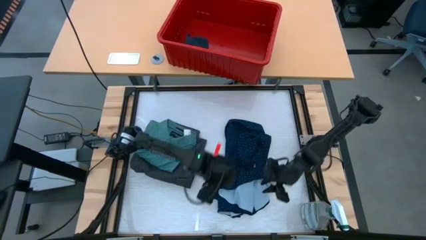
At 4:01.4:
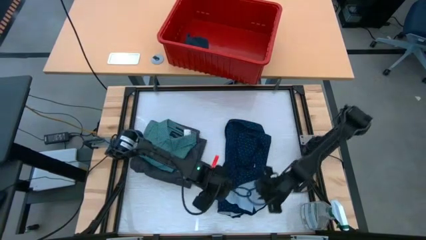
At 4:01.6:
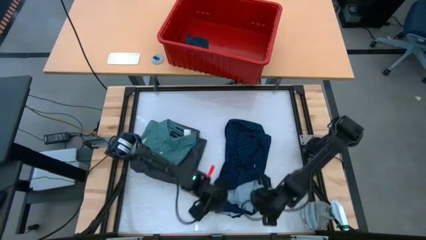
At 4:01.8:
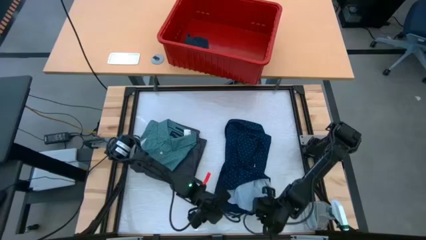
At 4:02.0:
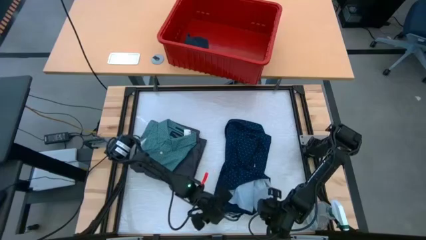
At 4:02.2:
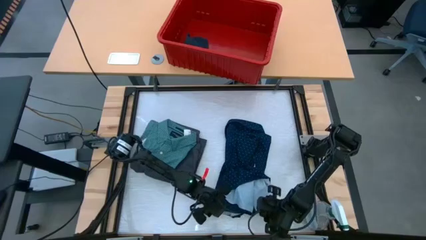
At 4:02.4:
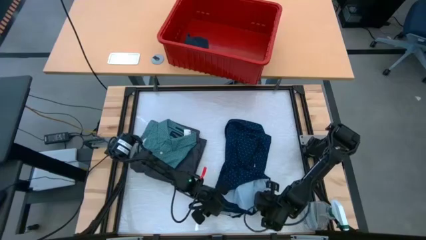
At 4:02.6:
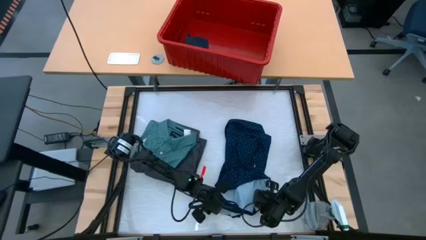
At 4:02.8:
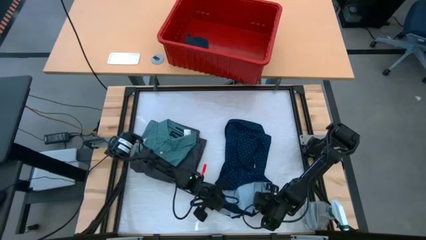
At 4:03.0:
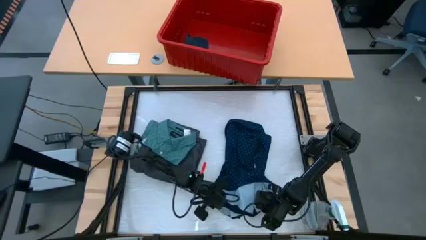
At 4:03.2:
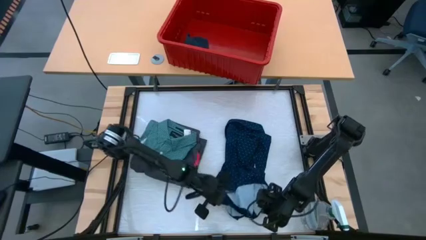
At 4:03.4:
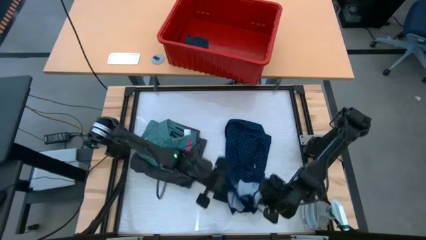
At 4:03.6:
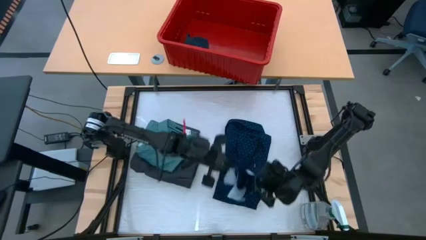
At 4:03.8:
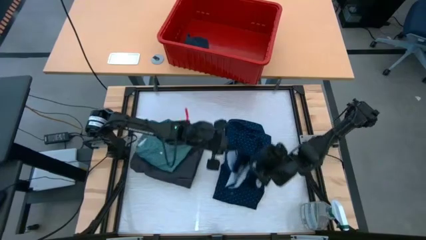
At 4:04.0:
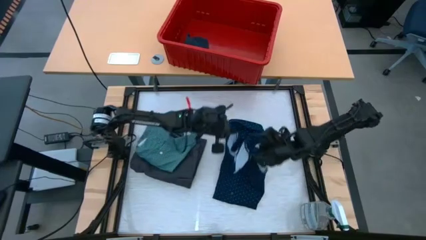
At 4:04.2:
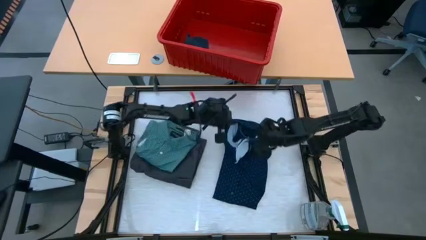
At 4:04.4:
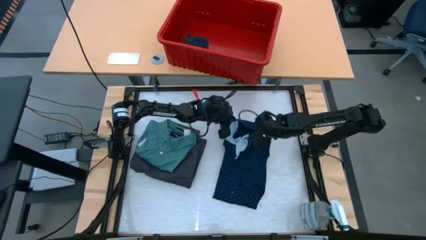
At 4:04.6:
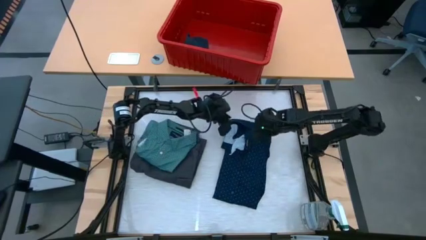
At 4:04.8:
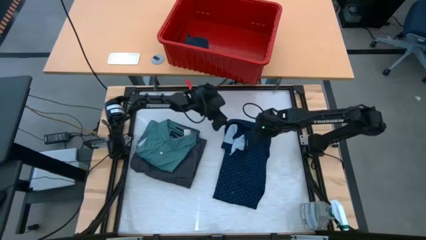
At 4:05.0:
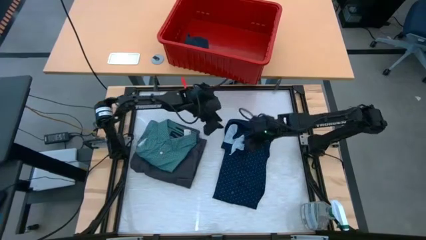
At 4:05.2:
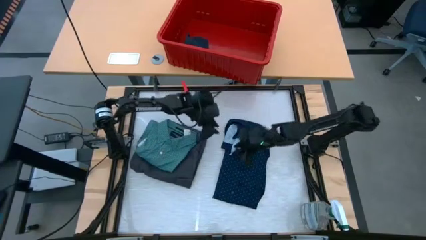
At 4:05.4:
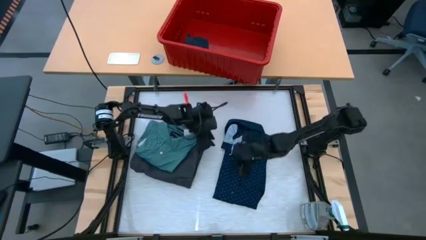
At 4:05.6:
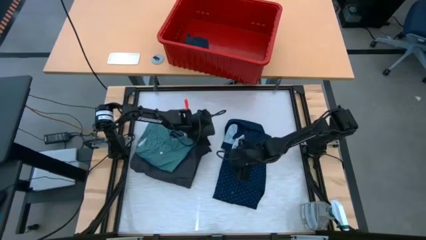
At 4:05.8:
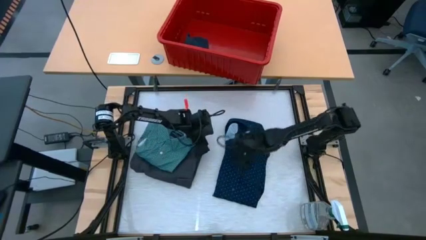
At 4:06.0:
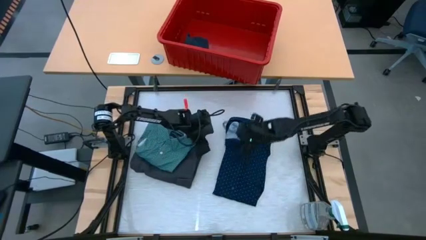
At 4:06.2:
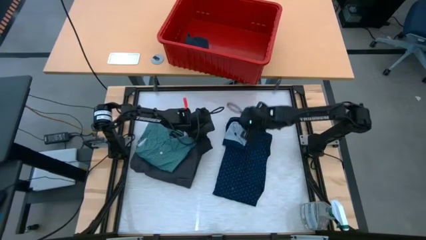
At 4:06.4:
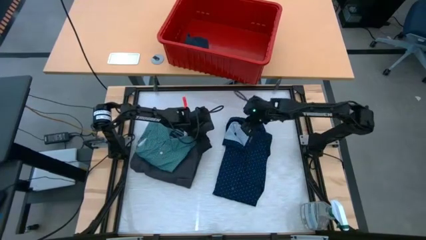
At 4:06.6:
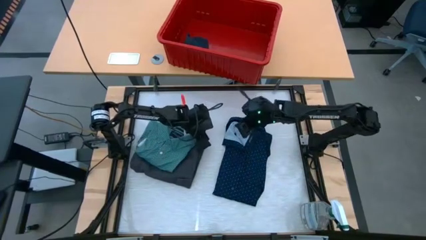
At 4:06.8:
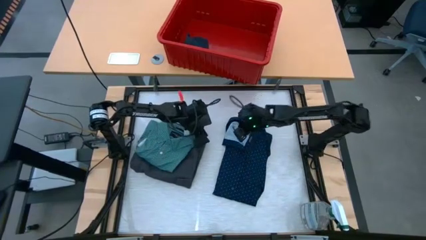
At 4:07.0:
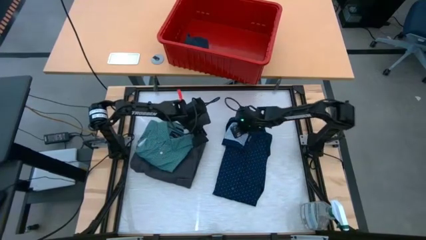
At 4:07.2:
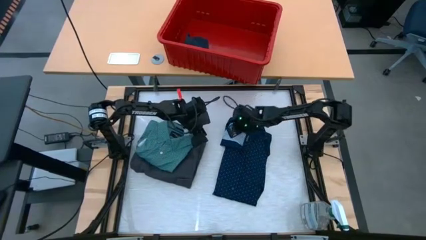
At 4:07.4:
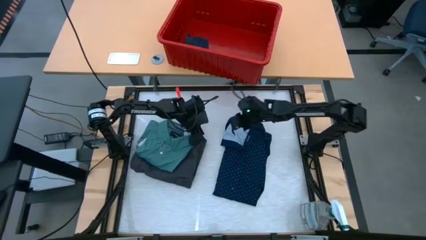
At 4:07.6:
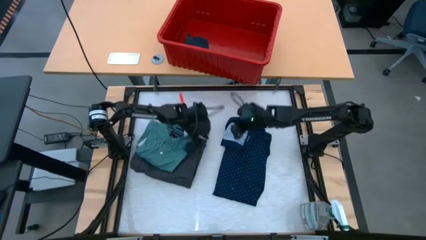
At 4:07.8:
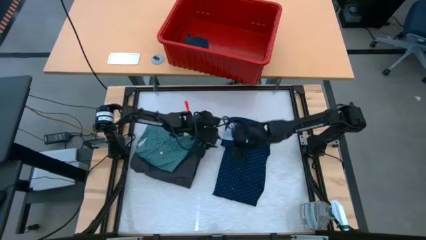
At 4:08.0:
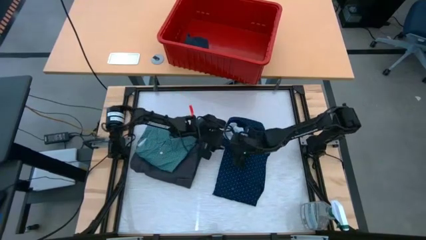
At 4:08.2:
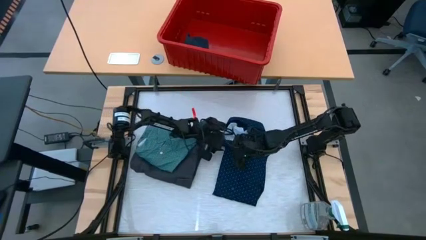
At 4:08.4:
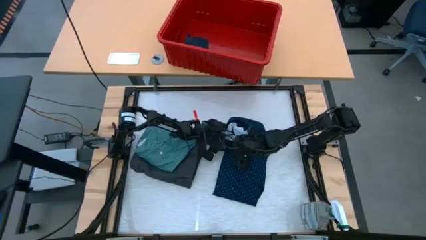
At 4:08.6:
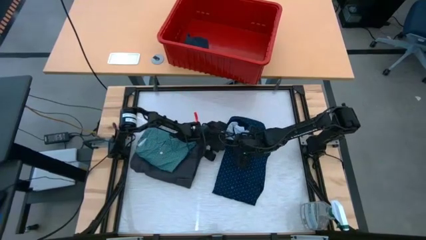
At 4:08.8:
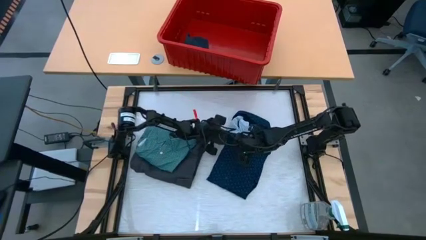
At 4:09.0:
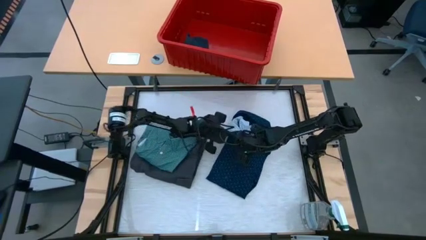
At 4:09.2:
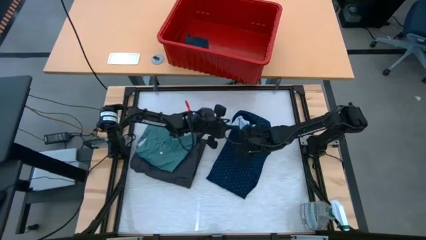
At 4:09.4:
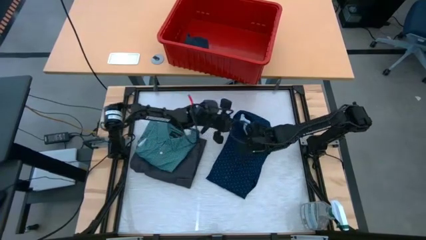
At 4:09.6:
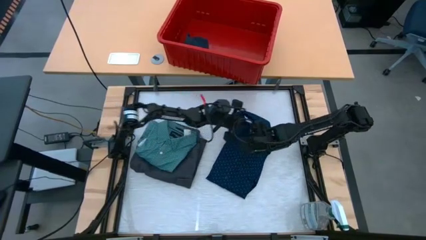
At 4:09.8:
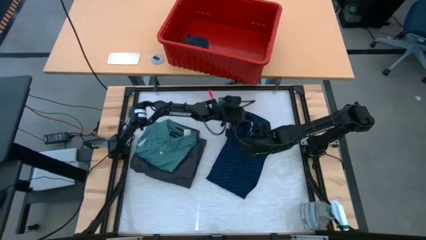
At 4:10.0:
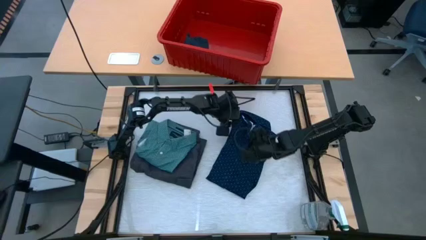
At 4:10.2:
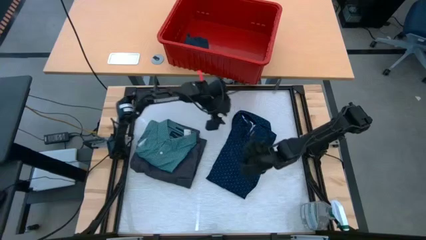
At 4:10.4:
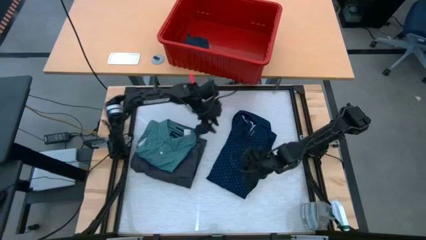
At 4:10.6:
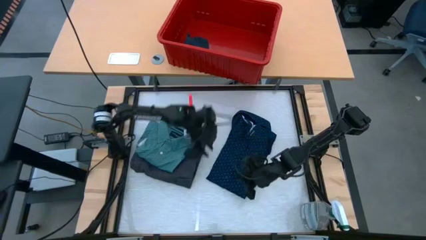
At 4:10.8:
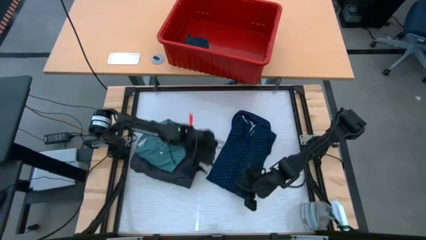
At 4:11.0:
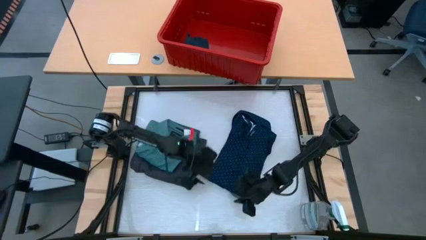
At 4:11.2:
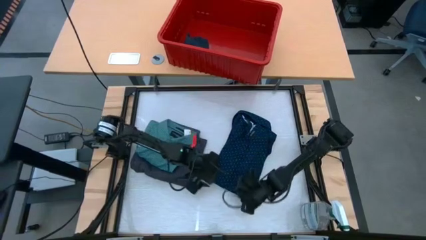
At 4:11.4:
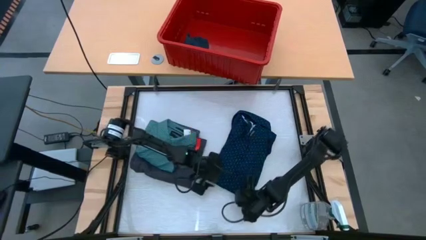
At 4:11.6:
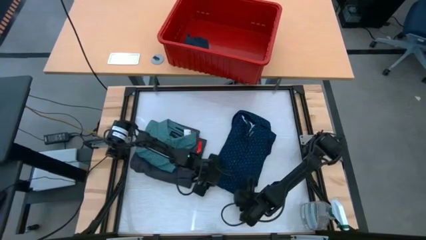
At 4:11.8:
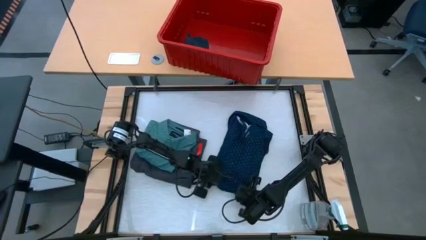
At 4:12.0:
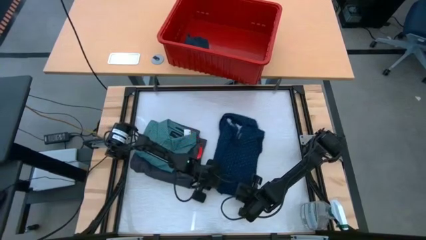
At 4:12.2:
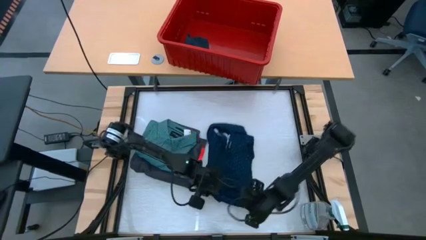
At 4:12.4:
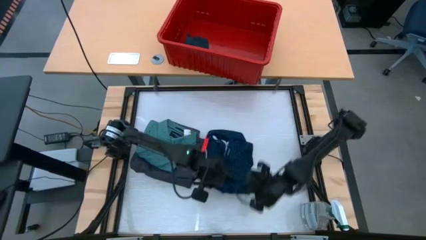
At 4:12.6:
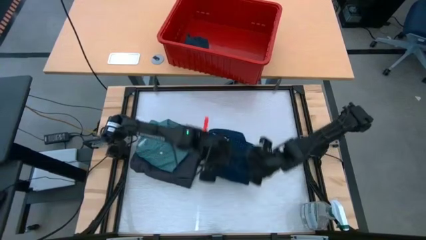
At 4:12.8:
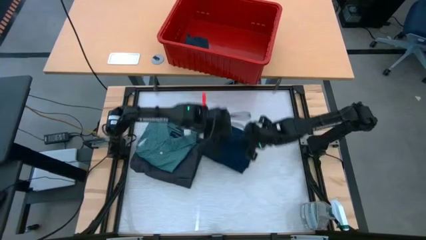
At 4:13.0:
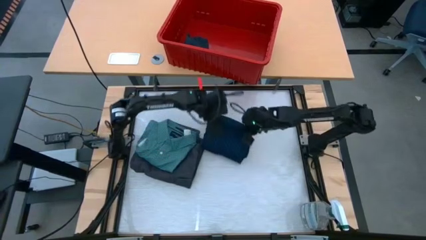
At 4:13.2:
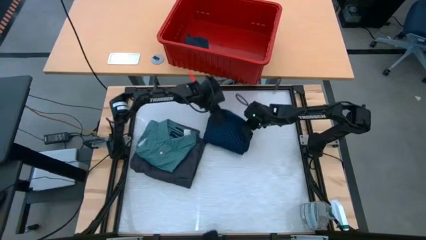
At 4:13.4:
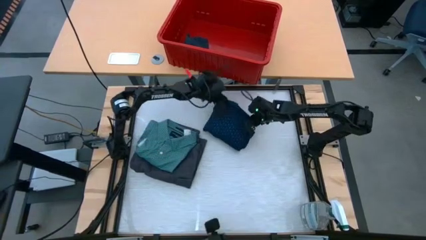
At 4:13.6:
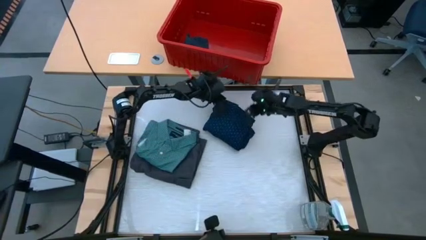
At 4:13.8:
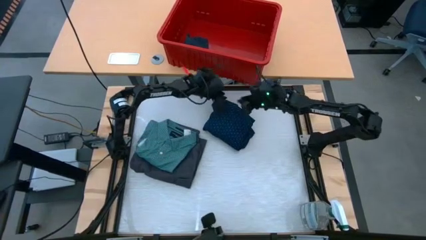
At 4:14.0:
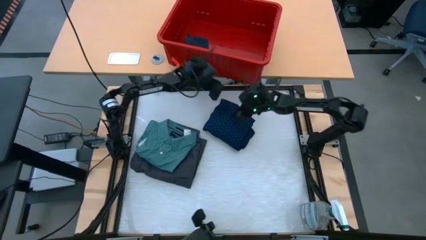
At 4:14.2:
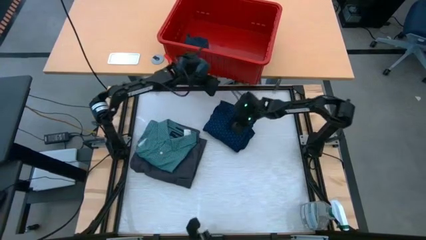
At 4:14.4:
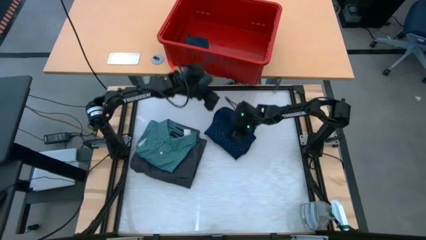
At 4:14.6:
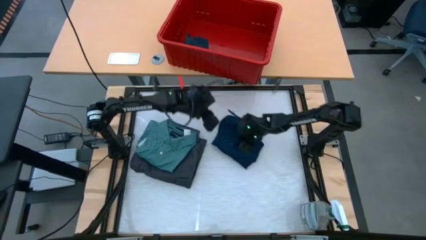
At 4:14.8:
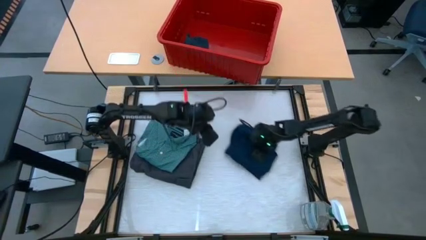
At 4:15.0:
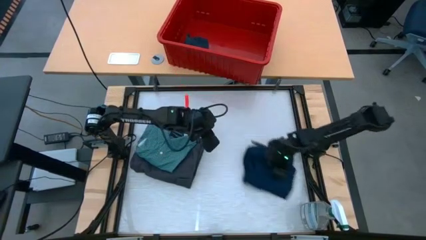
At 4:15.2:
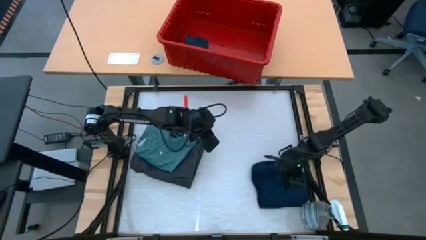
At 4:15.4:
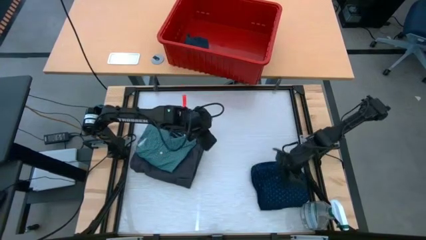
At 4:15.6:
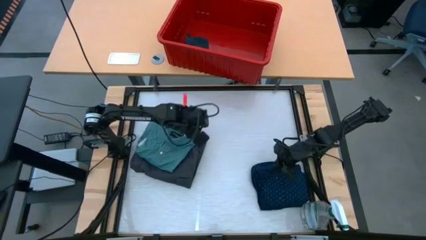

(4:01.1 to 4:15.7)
Task: Fold laundry
Fold the dark blue polo

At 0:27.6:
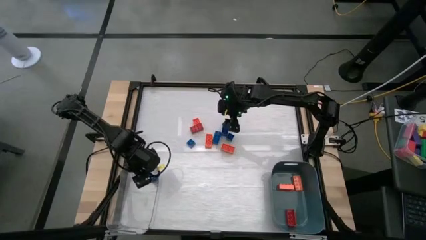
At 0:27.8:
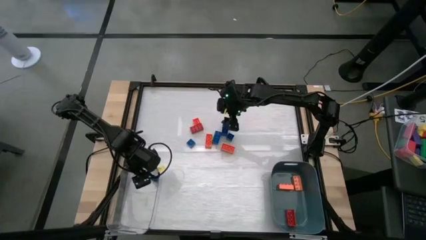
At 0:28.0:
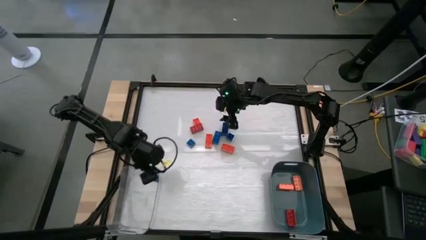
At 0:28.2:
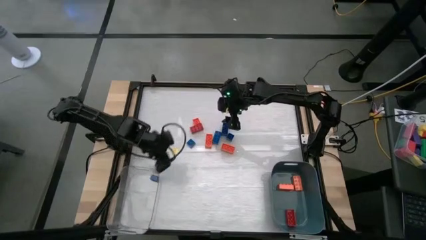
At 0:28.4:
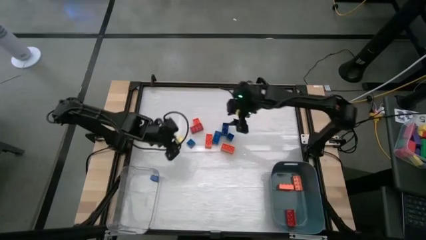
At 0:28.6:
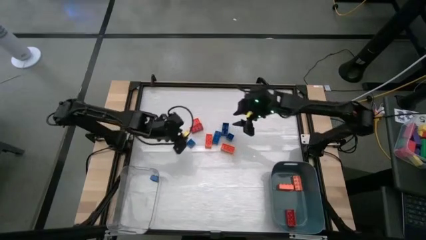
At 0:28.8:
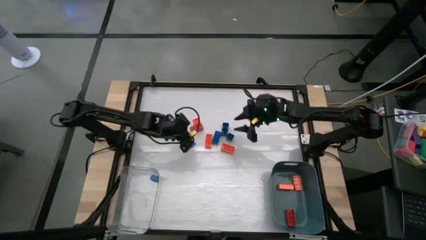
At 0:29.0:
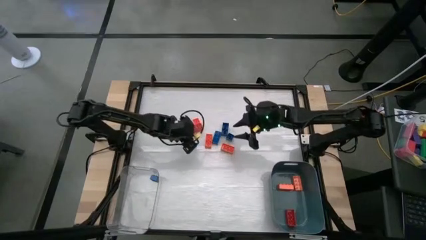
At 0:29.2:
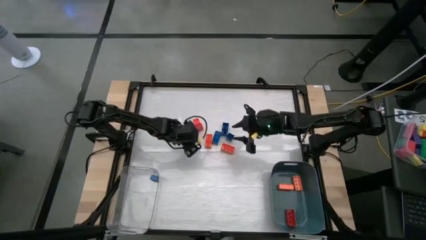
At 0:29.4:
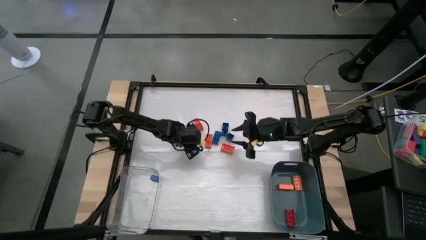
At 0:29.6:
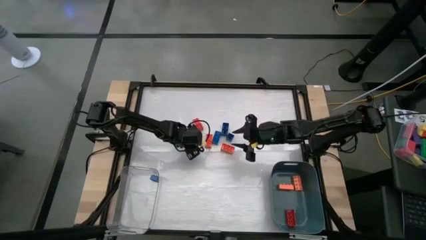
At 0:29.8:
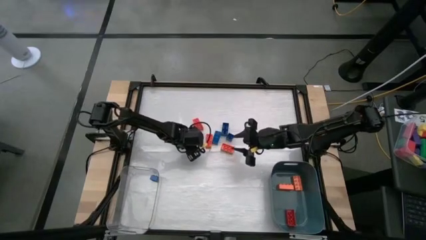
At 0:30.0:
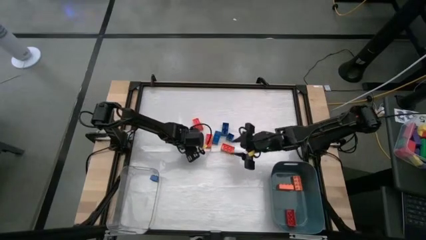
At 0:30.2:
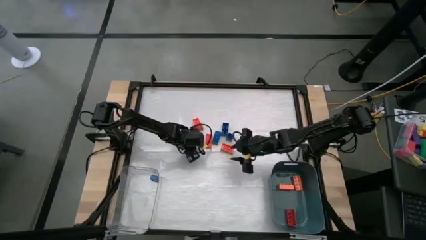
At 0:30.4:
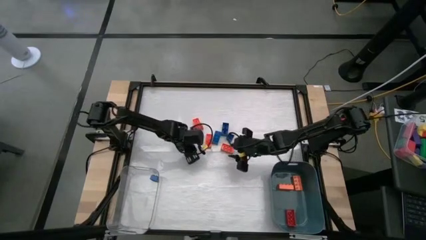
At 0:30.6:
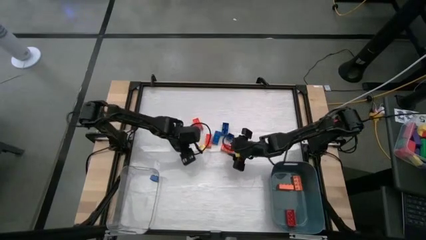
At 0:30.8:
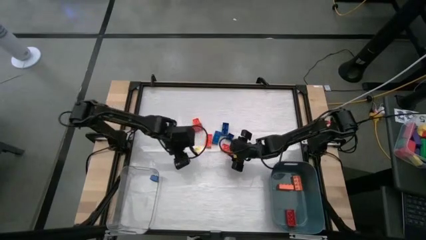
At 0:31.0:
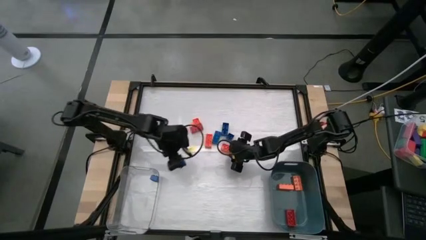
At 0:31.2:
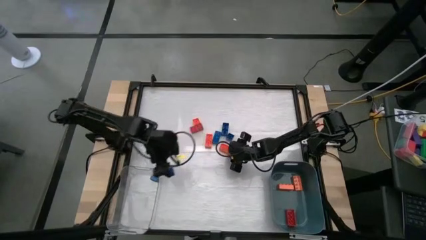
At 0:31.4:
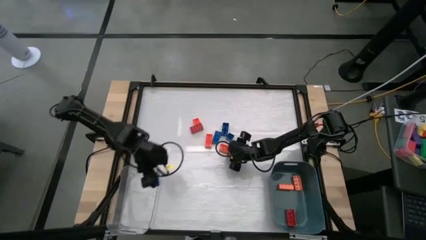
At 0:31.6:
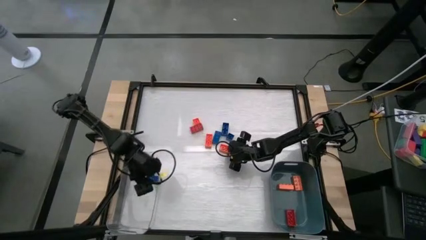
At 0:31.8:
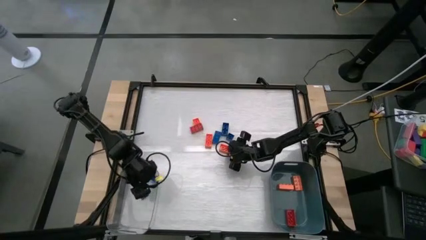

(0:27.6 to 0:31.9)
Task: Sort blocks by size
Put the small blue game piece into the transparent bin
